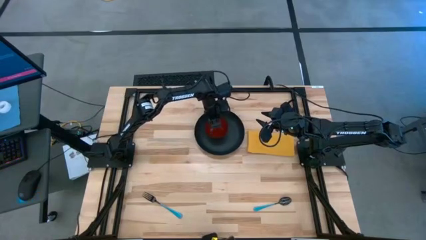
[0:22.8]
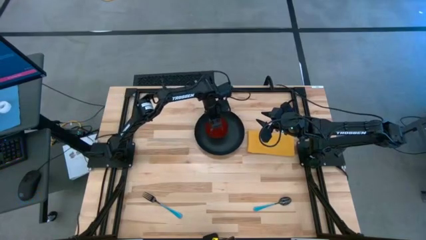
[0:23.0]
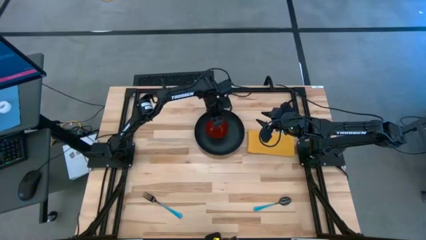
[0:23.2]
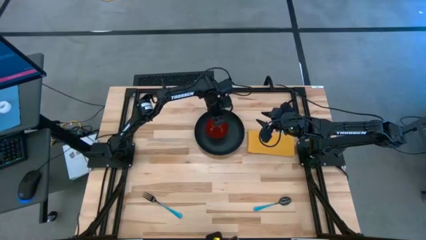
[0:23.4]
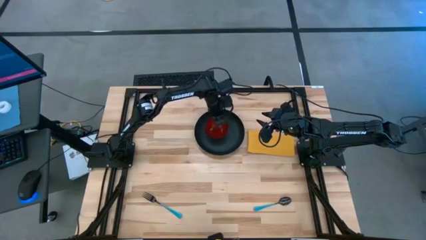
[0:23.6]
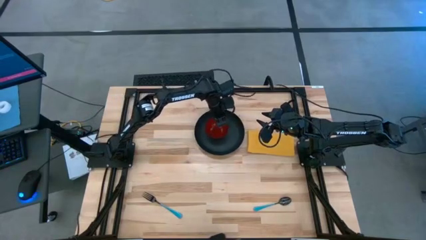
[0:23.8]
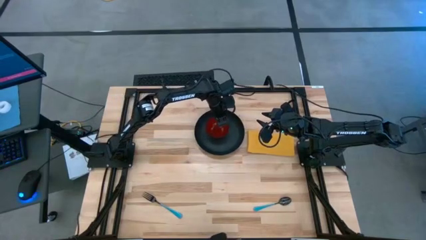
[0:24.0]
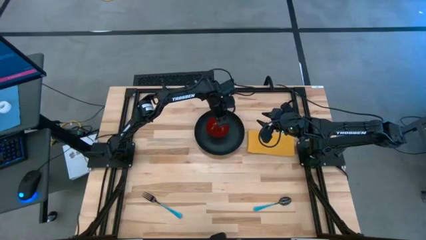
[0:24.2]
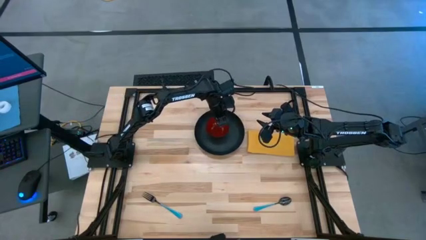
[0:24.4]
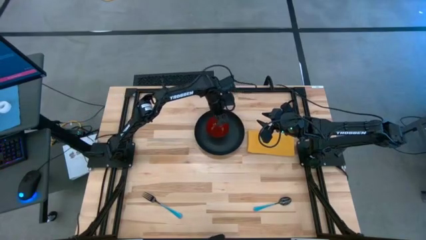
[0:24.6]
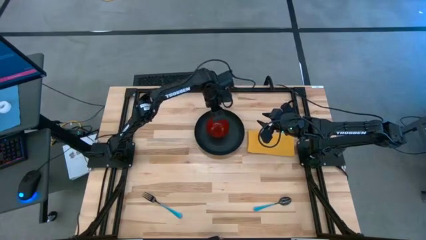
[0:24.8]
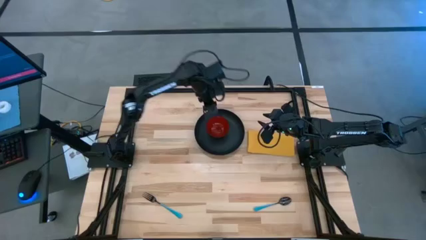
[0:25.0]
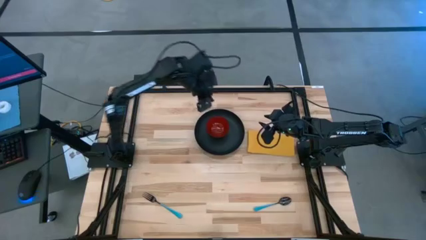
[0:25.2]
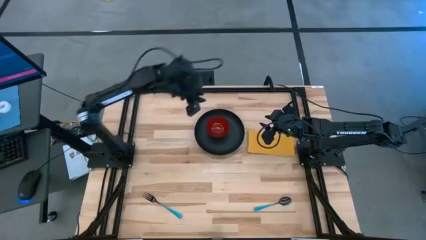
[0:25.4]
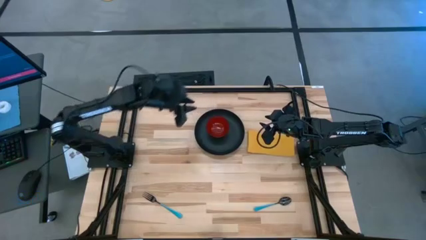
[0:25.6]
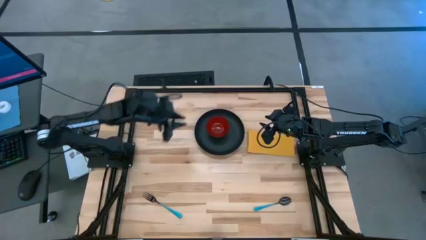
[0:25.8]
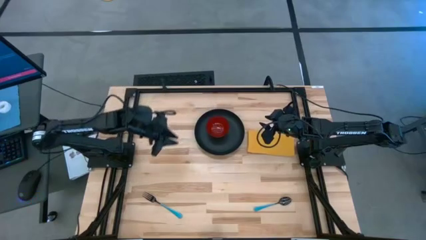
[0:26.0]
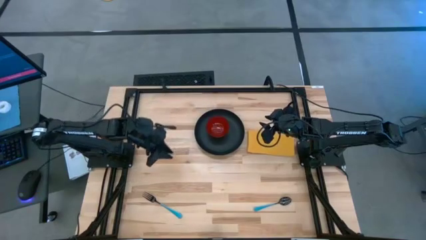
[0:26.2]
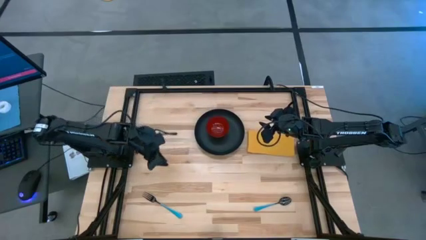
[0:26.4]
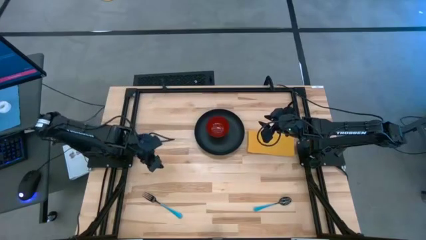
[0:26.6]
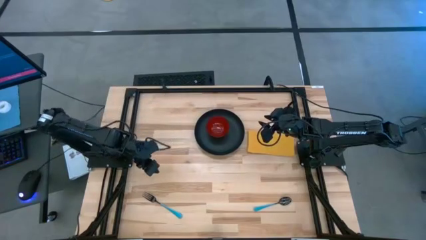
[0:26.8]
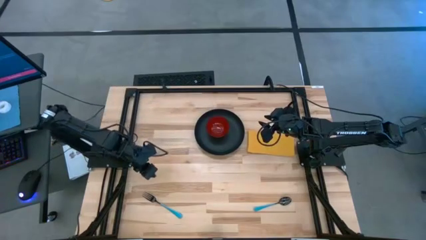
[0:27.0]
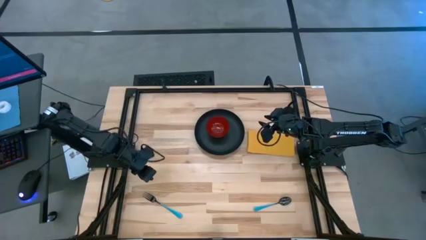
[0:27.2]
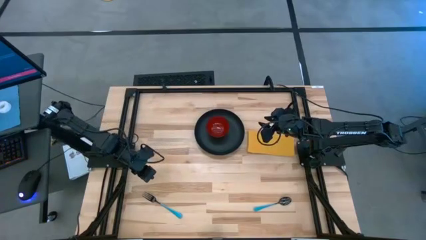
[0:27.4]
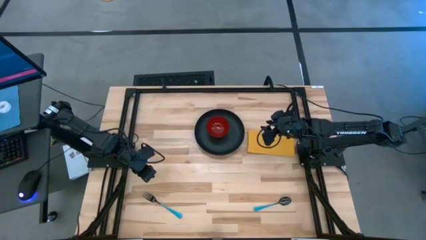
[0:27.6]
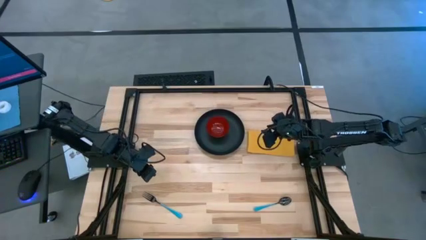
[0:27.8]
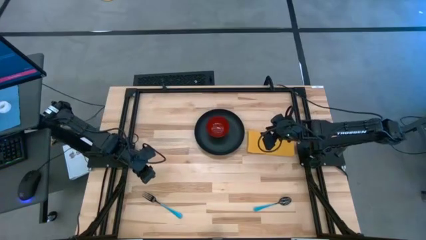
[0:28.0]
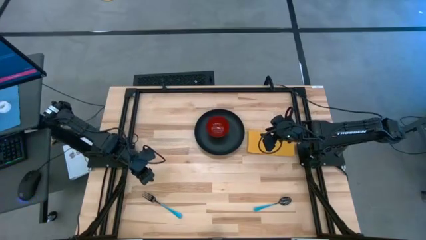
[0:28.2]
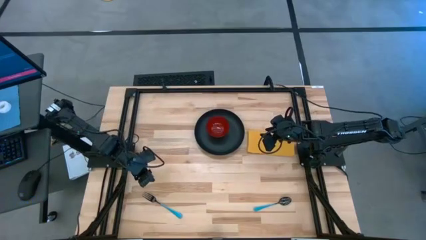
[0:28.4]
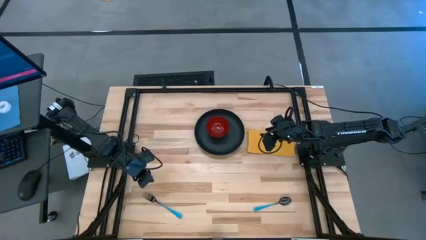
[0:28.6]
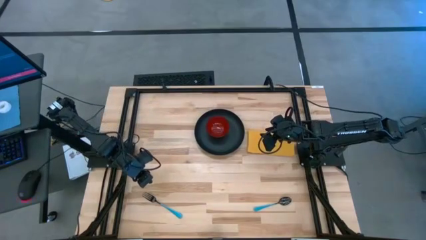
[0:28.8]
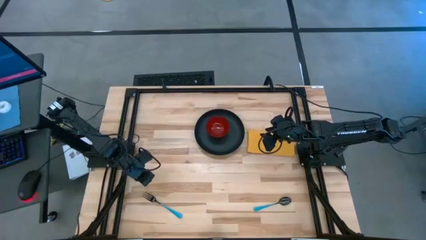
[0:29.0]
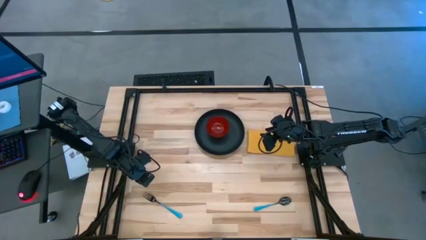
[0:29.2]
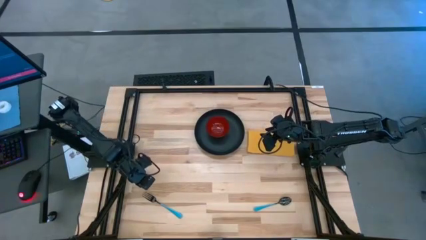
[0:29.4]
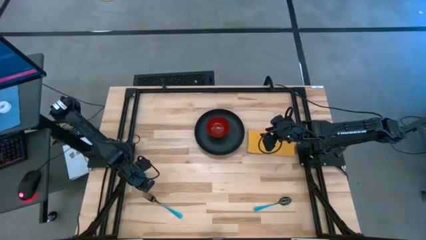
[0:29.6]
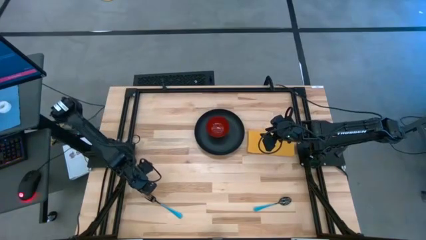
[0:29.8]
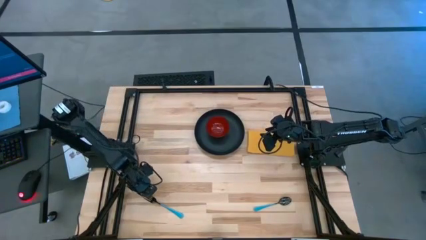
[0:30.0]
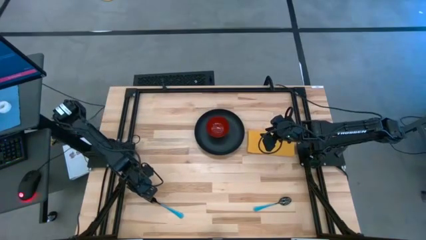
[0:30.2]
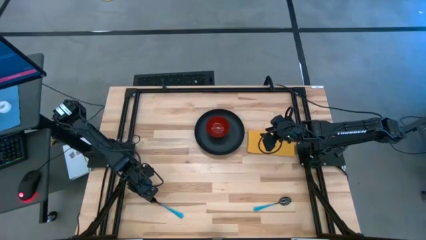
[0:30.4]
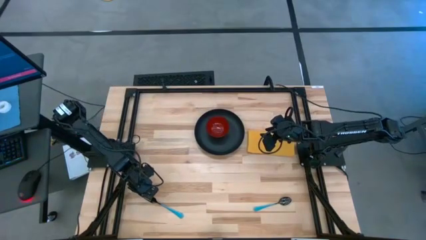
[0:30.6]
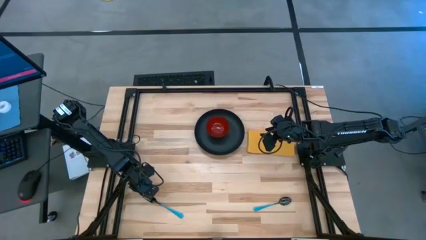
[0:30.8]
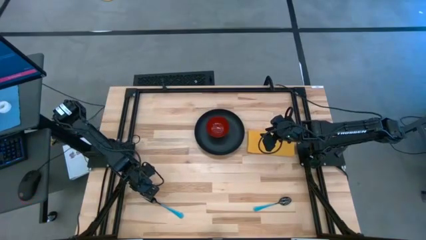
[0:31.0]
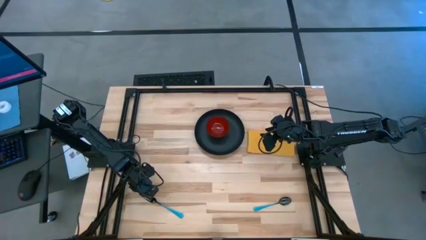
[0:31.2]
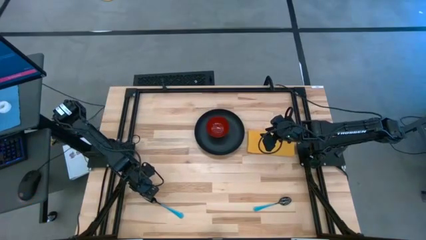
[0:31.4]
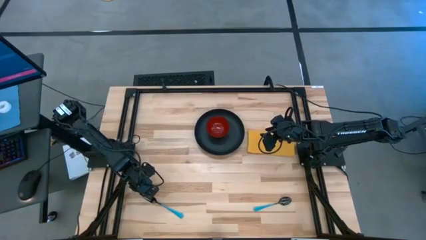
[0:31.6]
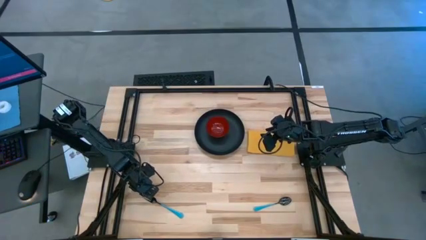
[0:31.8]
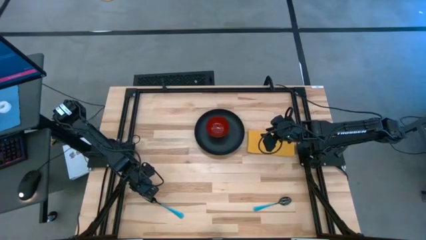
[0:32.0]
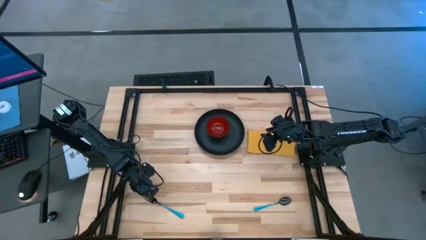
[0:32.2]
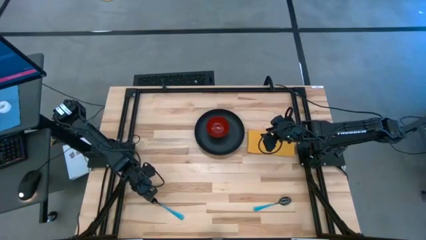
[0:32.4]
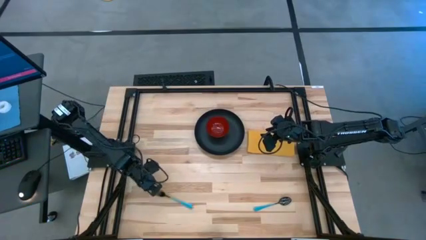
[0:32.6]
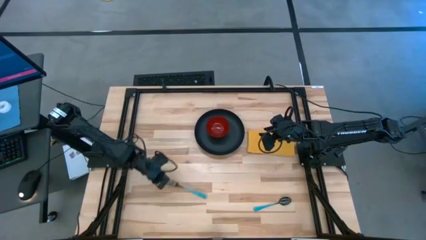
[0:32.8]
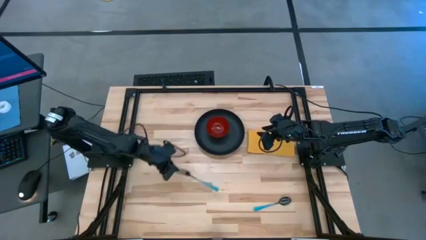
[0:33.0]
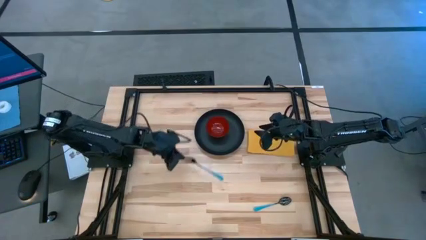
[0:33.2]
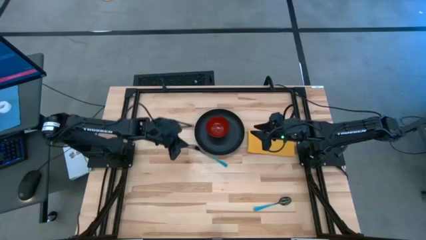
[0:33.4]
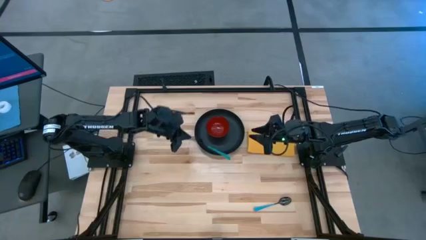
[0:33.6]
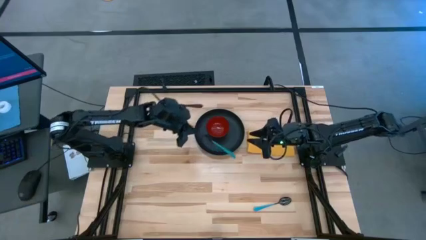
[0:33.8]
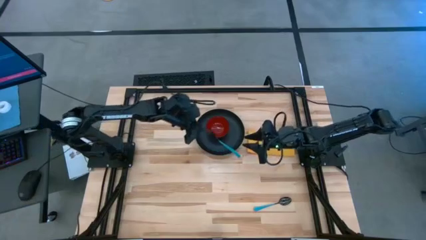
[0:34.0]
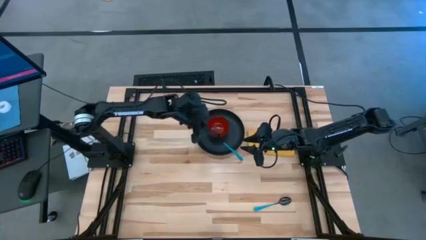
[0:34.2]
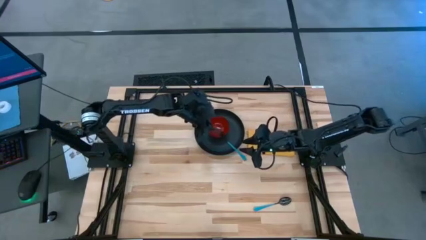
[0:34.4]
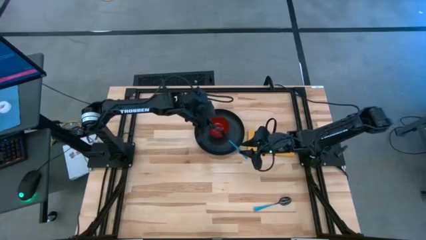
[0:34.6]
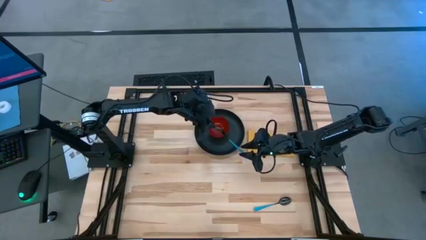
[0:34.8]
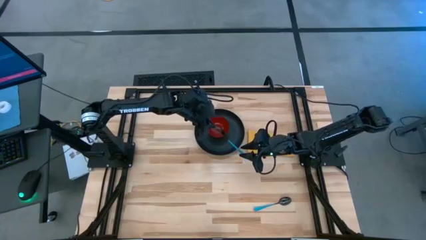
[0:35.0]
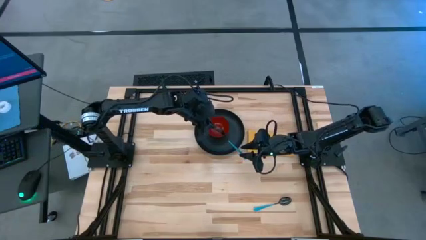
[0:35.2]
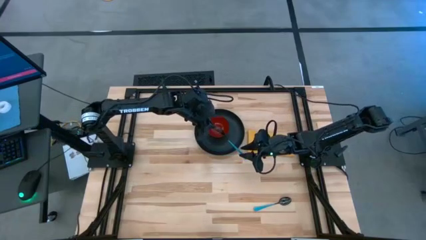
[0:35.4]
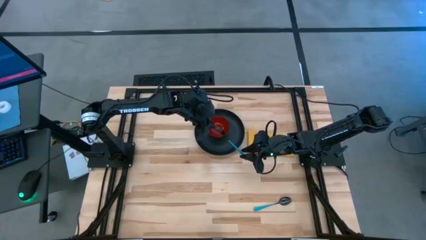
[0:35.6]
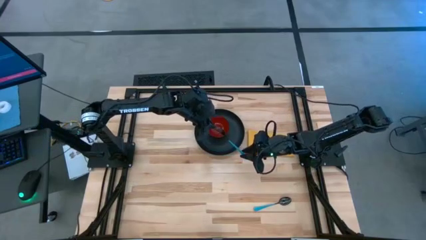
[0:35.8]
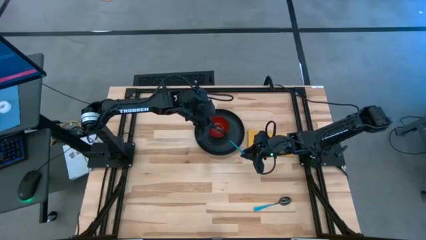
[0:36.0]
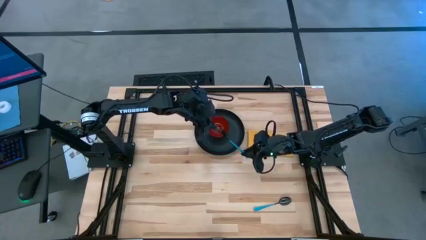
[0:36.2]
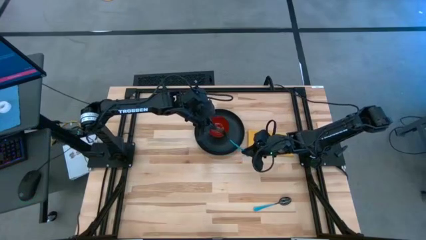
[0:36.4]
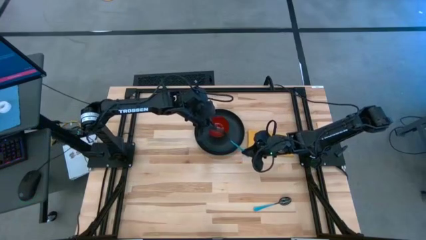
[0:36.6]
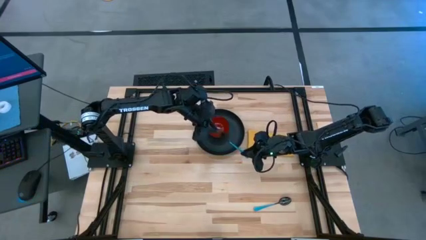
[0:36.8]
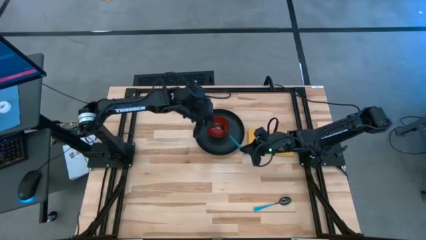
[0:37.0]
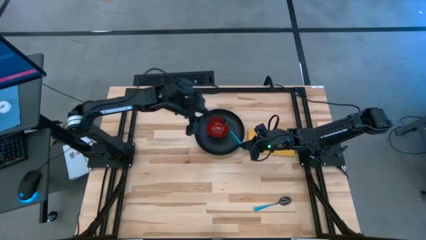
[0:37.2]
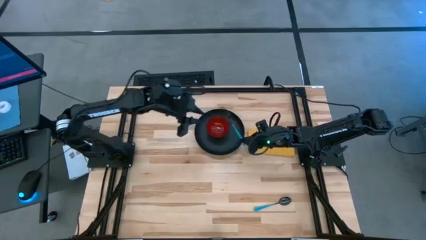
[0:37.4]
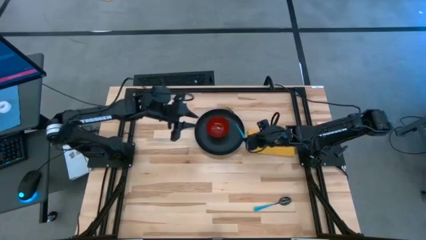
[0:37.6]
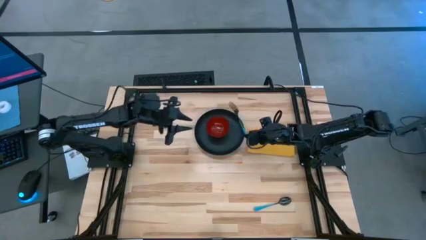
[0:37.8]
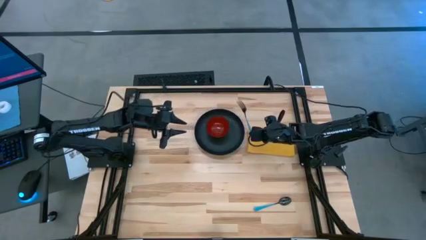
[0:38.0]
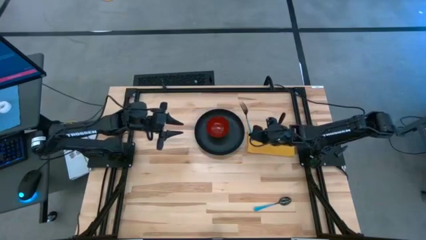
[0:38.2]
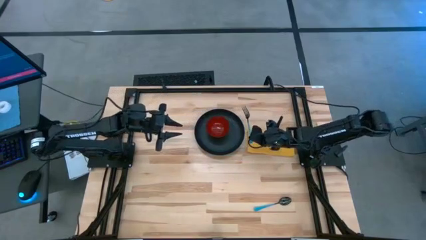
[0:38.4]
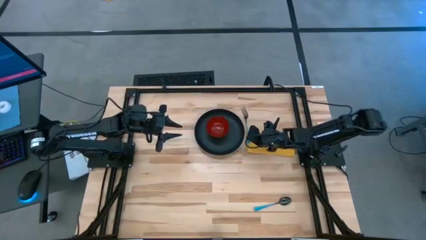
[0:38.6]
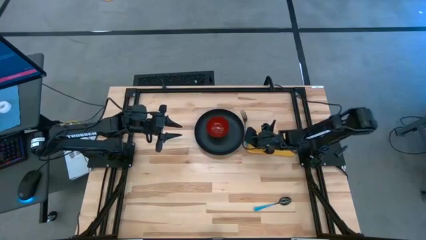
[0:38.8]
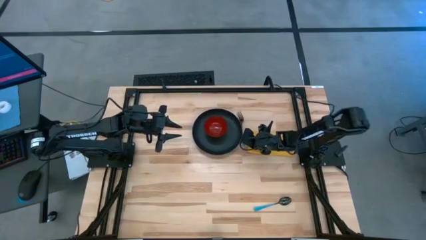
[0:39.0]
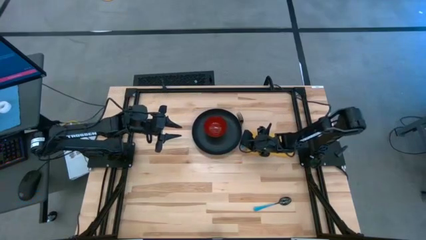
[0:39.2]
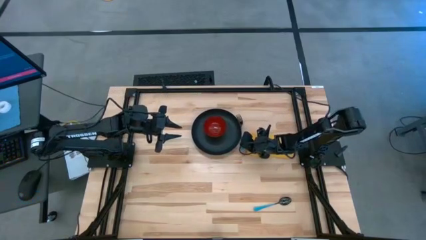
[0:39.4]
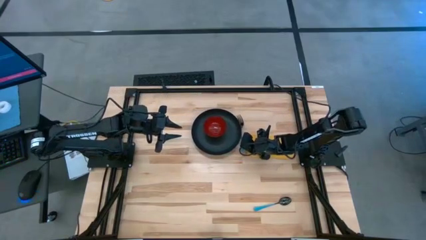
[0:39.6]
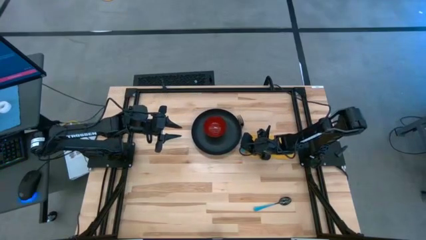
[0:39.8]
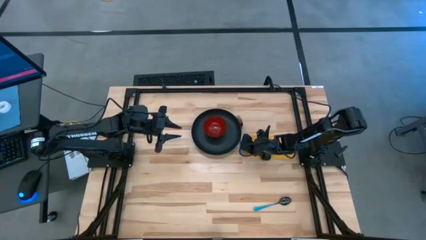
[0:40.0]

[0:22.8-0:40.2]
Task: Set table place
Put the blue fork beside the black plate
